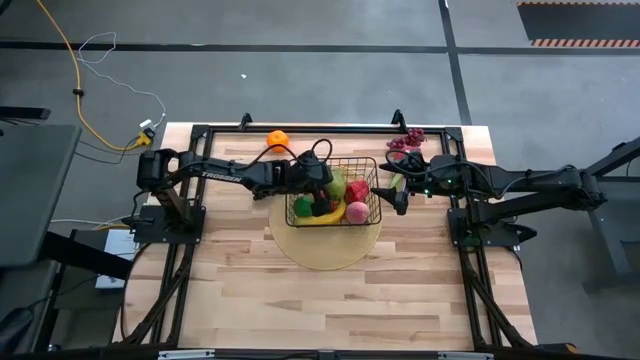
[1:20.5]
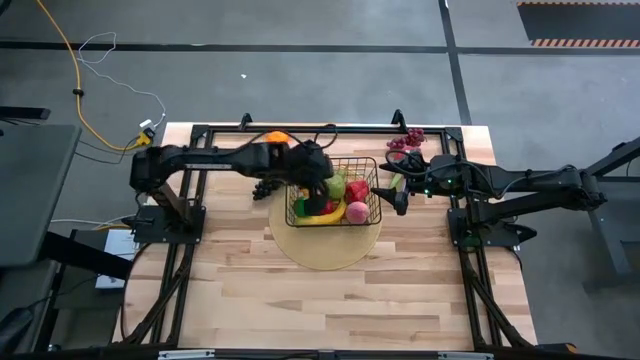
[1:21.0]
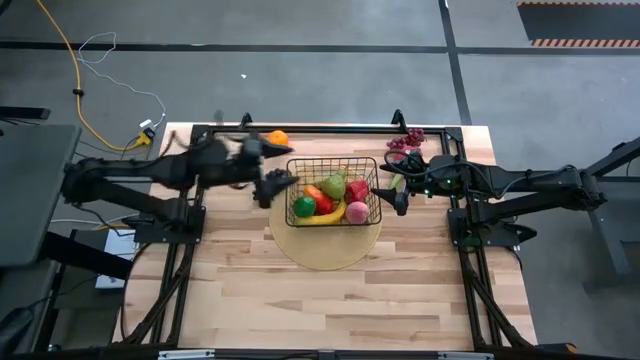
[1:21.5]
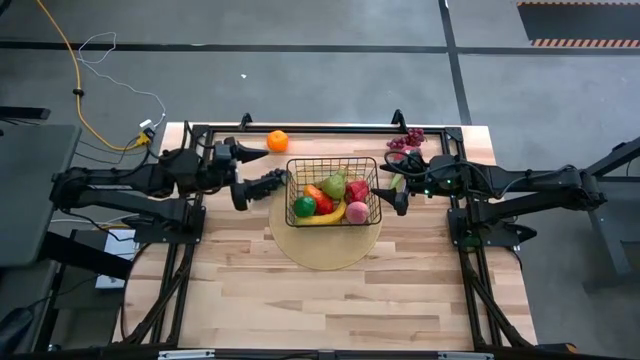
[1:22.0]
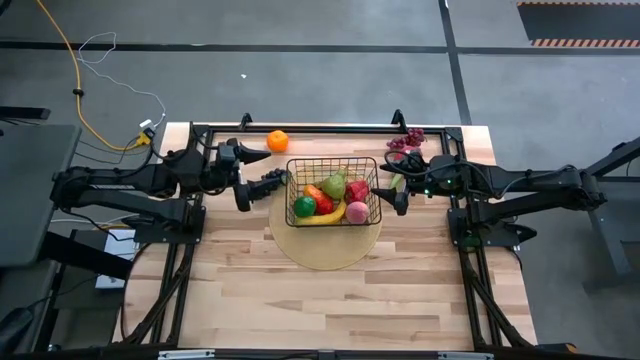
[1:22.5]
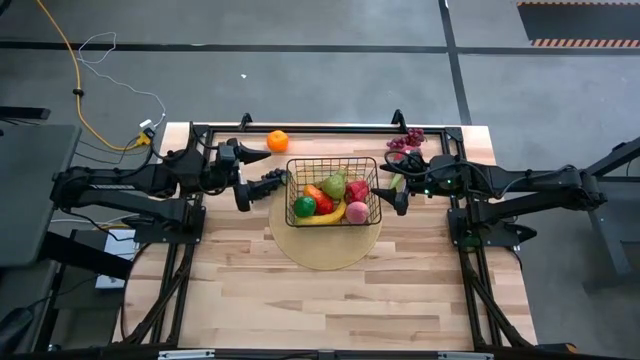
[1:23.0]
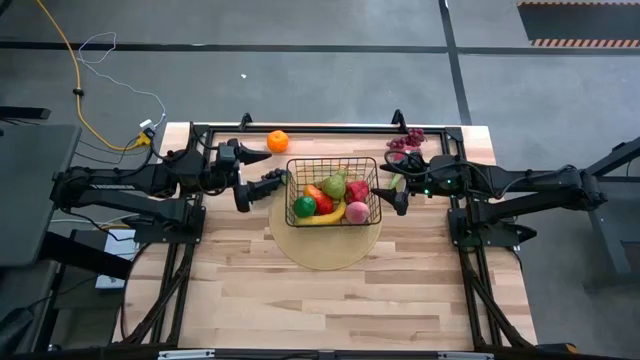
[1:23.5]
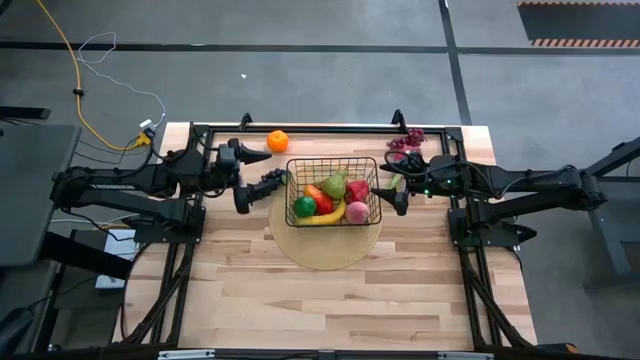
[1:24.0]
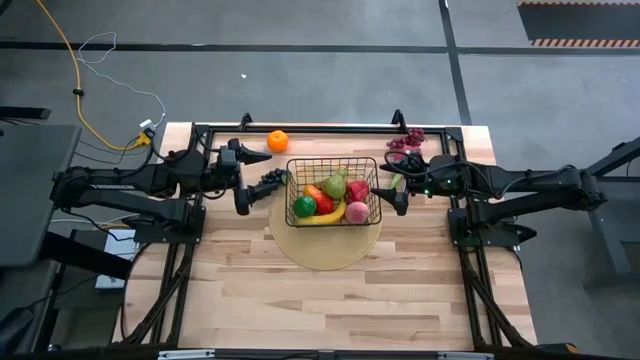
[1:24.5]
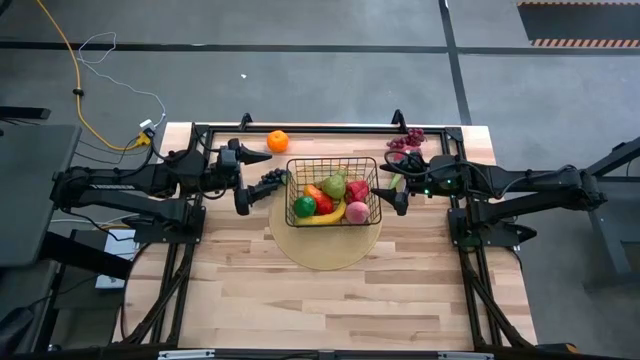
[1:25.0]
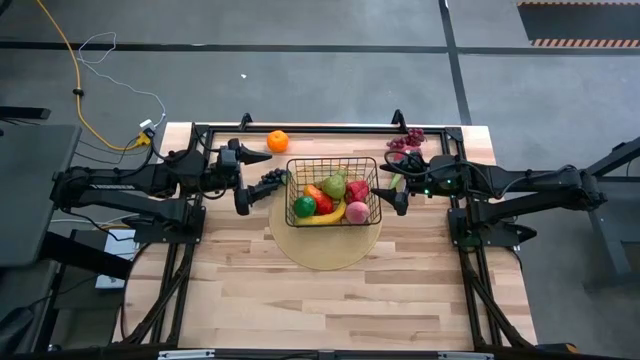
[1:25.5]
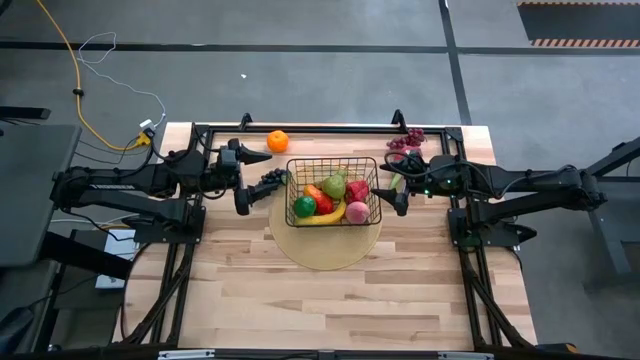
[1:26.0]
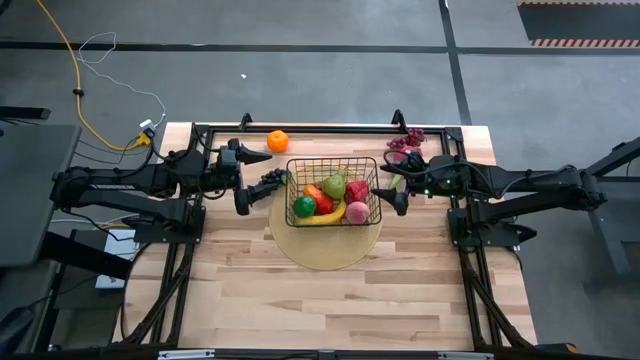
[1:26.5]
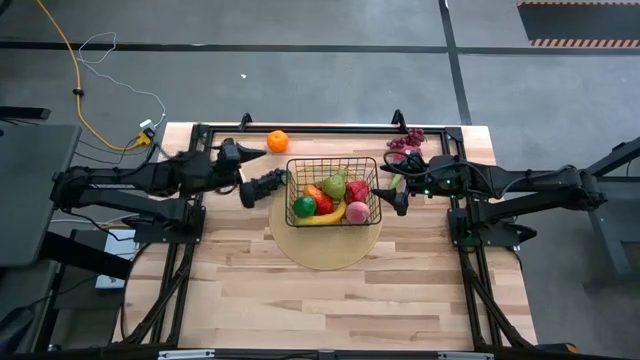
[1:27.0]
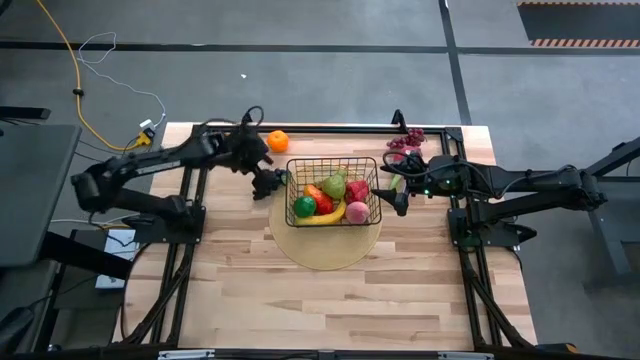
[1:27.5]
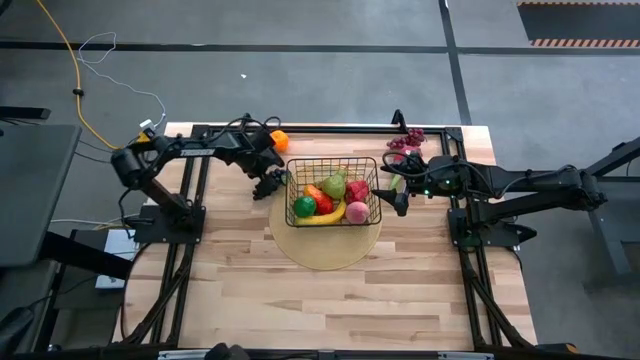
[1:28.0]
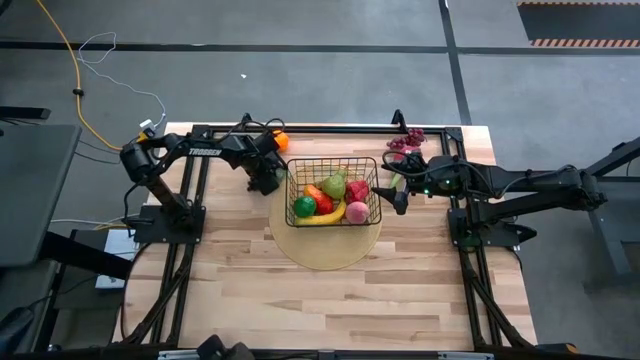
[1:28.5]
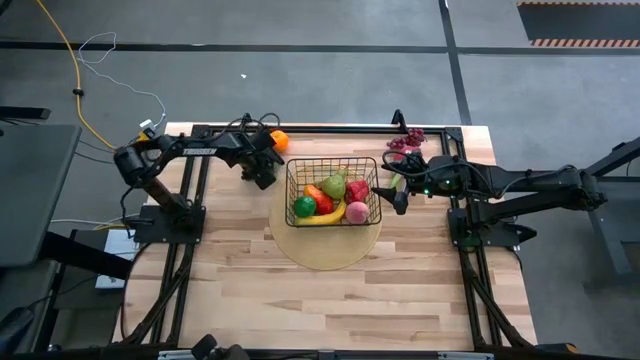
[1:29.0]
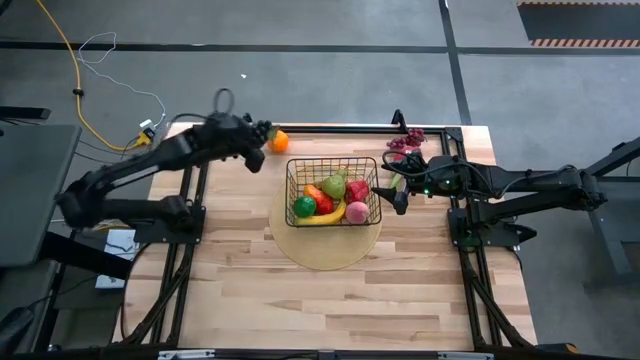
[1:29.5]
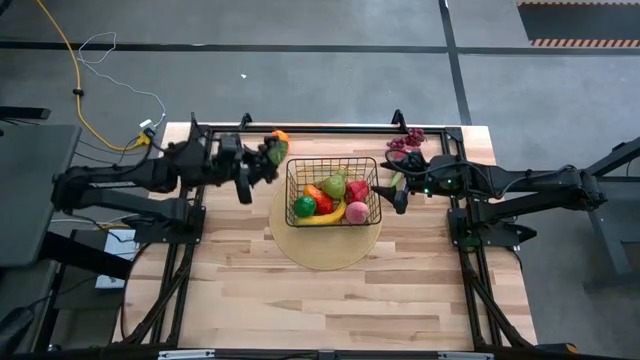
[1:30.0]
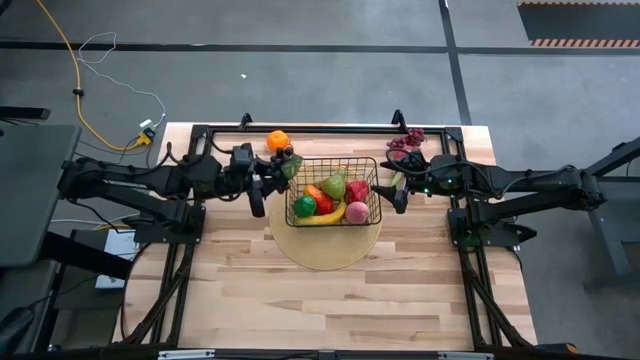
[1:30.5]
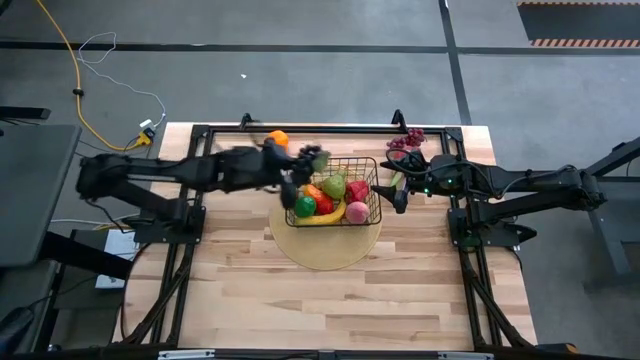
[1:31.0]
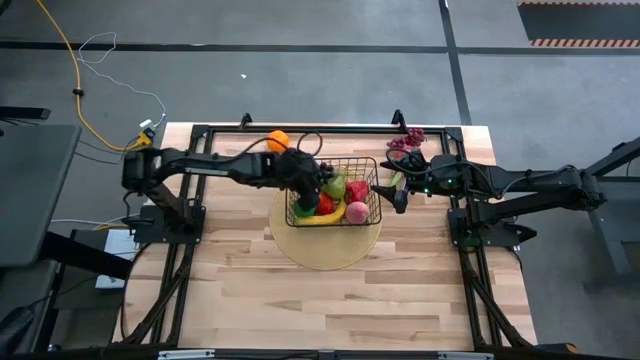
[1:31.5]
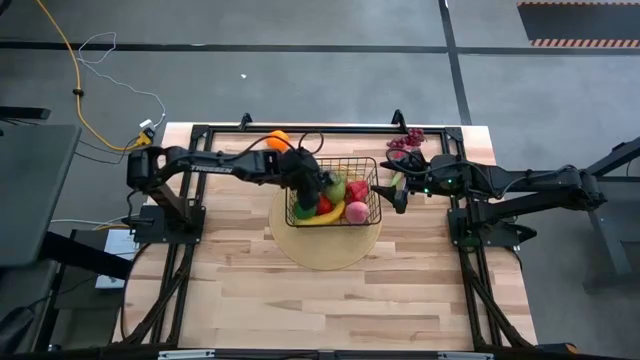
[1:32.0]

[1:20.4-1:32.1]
Task: Build produce basket
Put the violet grapes into the wire basket

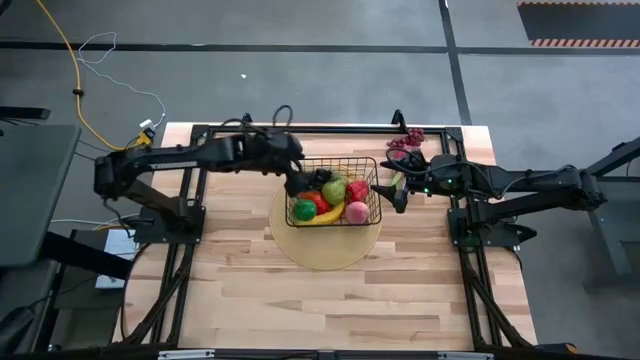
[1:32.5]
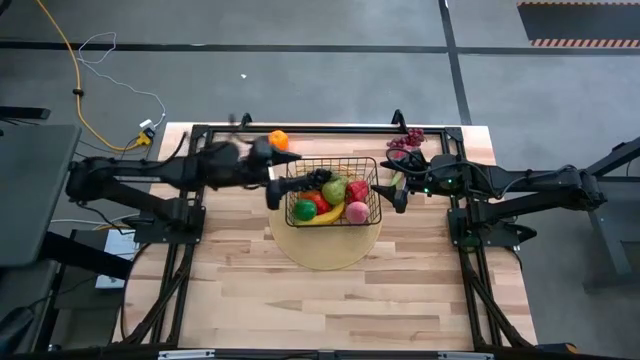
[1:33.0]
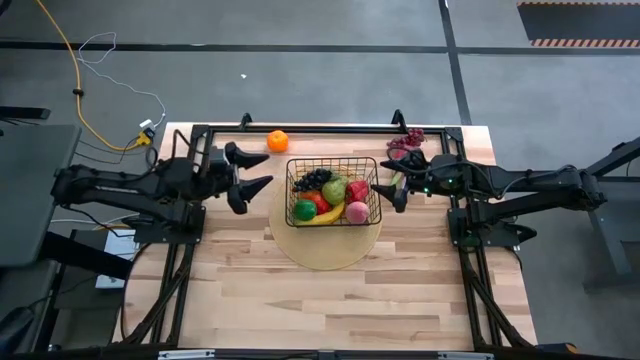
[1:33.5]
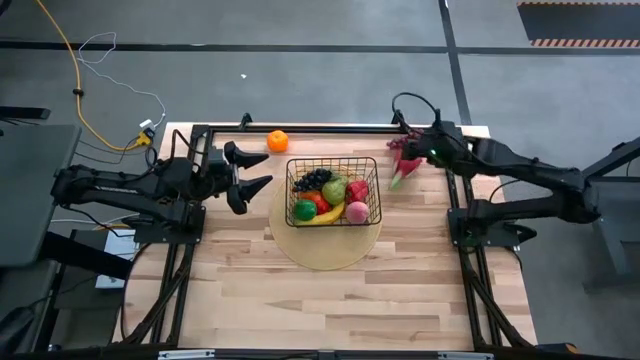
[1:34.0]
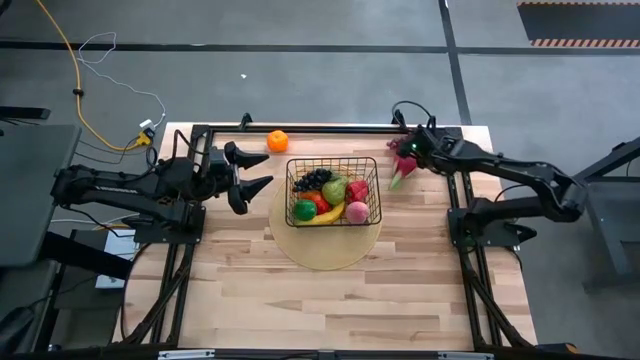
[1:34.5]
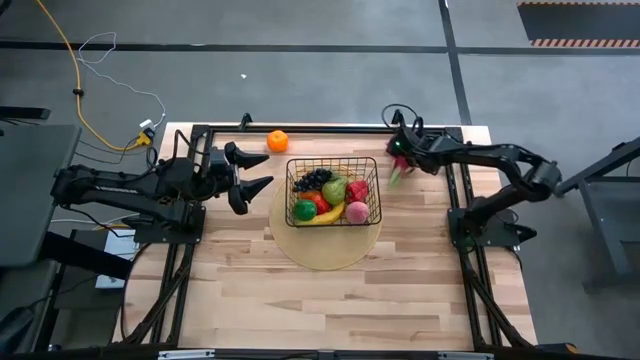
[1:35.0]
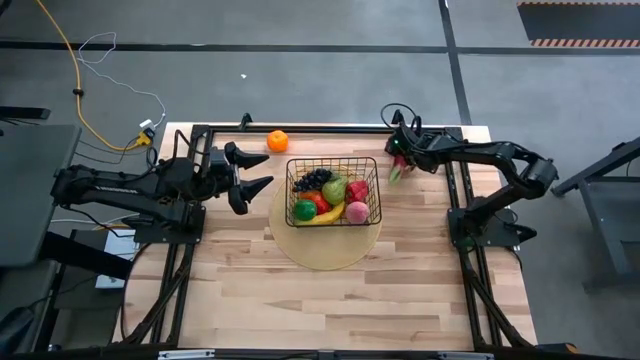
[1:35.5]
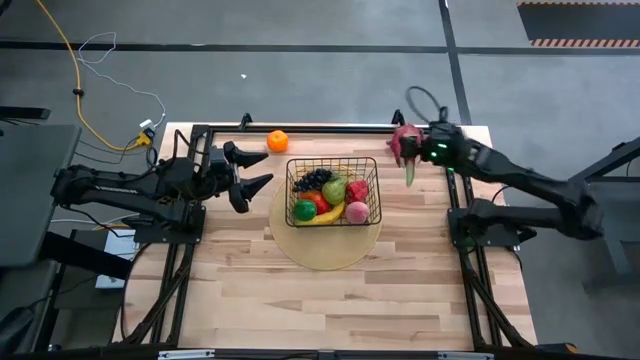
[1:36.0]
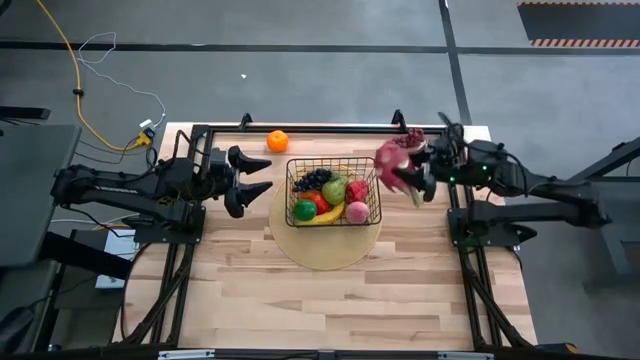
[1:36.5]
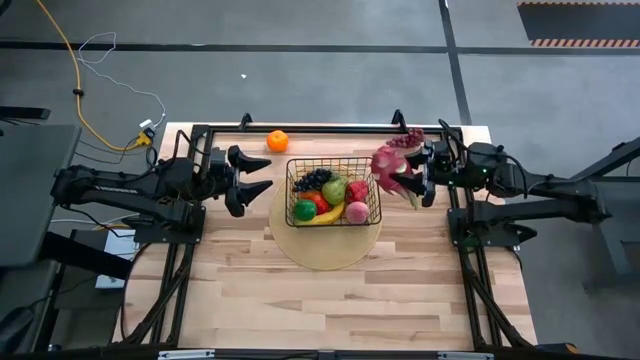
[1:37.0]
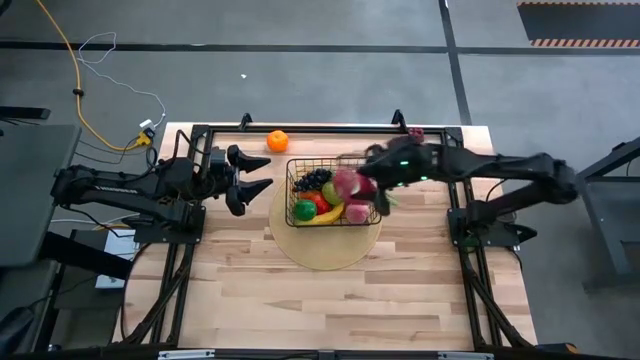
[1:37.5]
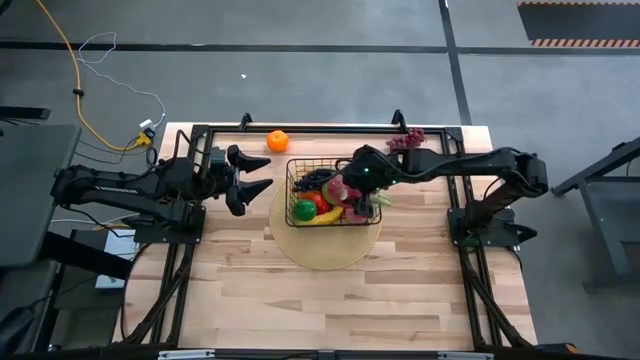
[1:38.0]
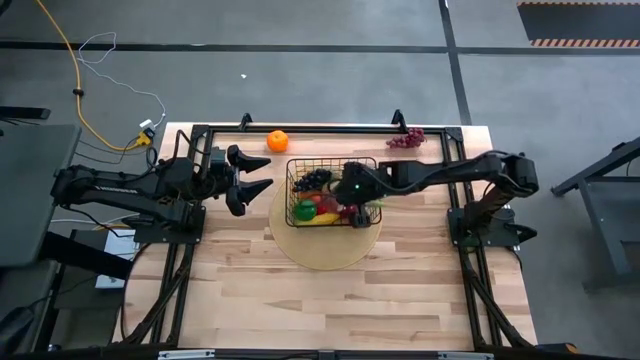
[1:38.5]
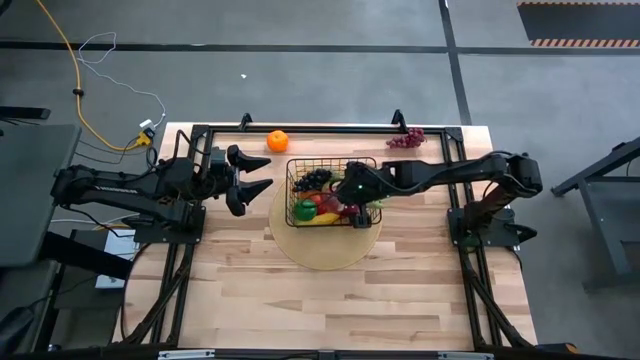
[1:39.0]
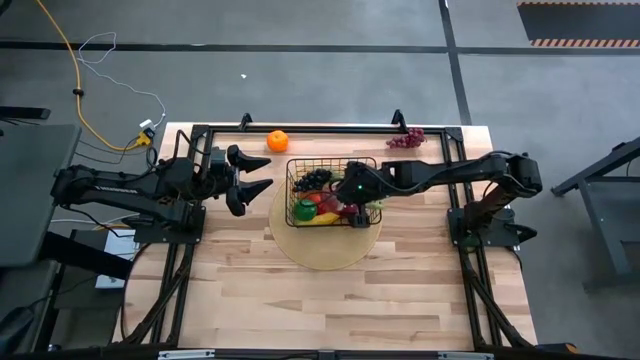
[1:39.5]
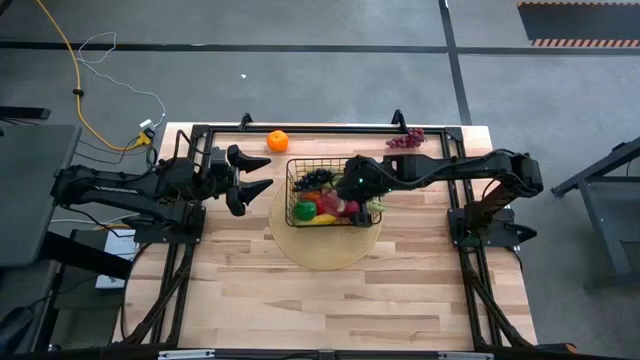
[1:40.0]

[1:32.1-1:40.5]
Put the dragon fruit into the wire basket

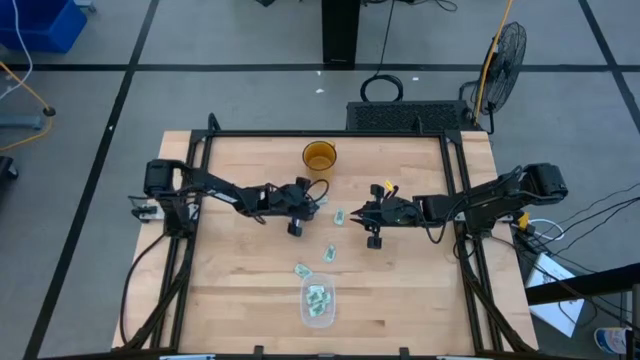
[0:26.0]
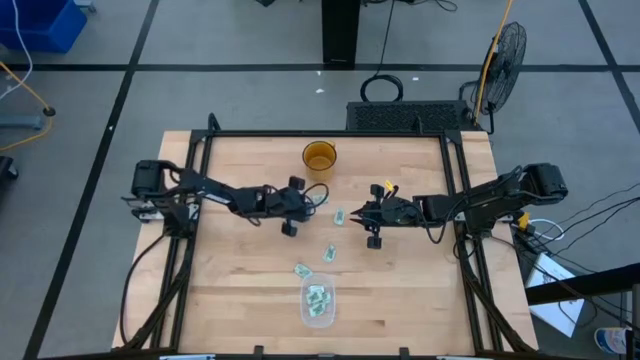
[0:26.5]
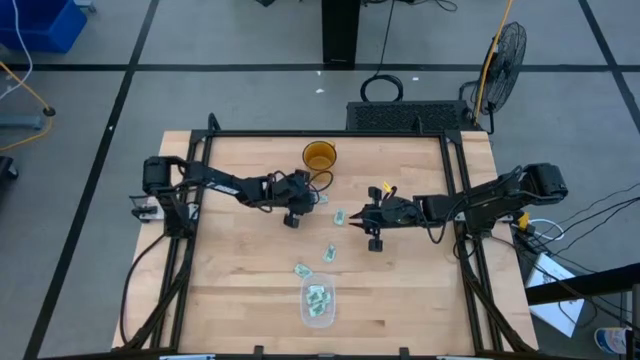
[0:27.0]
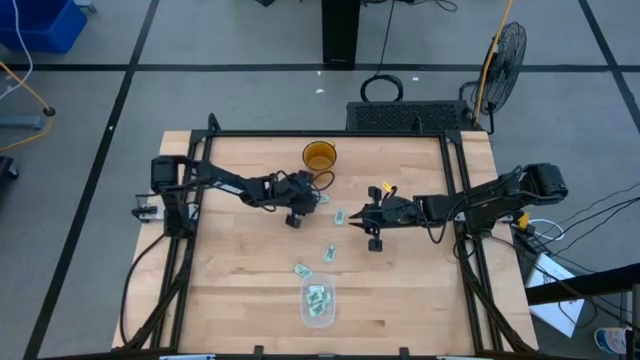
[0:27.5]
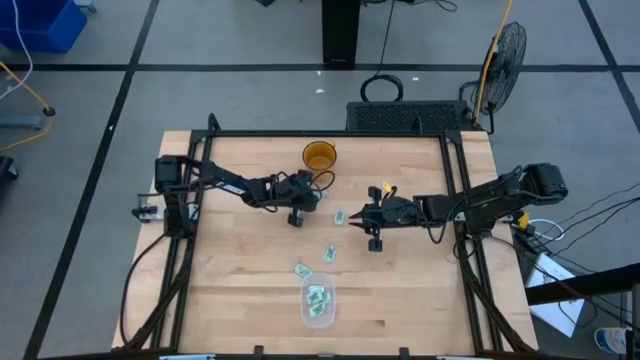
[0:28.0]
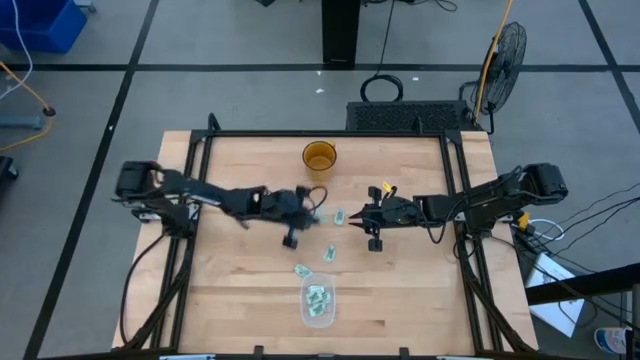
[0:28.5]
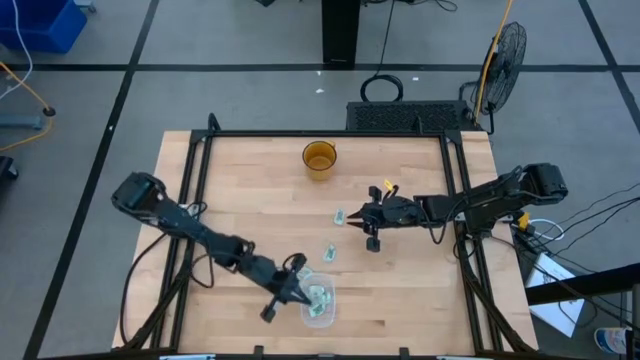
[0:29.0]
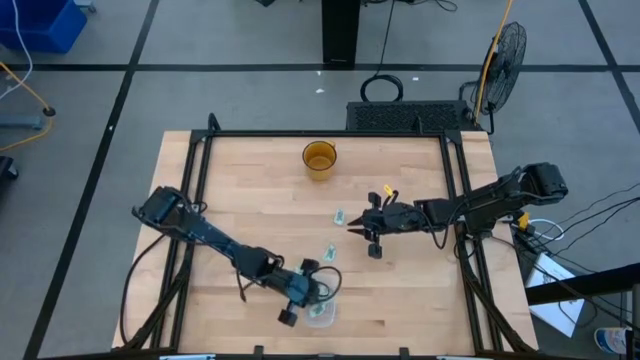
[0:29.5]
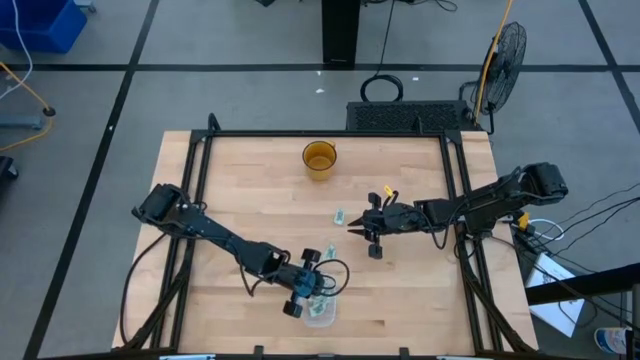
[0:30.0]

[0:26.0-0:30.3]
Task: Pick and place Stevia / Truvia into bins
Put the green stevia packet into the transparent container
